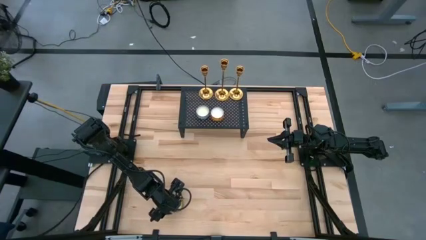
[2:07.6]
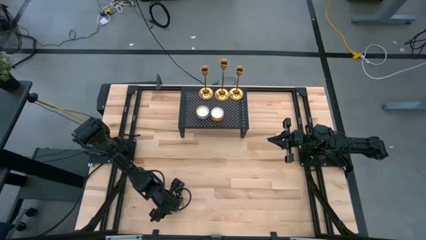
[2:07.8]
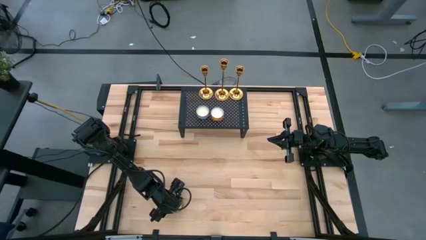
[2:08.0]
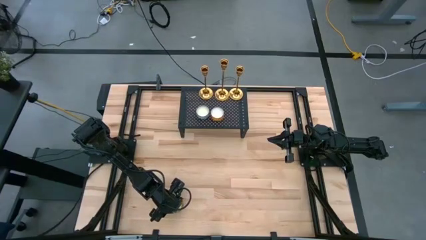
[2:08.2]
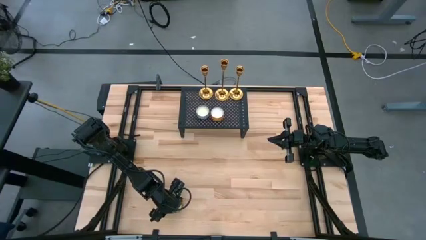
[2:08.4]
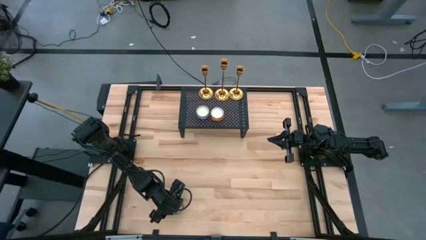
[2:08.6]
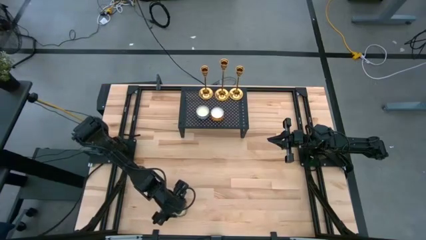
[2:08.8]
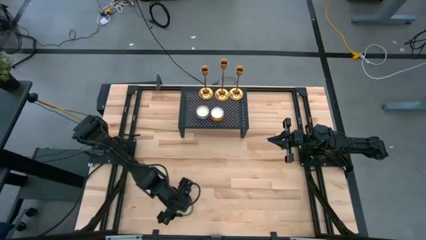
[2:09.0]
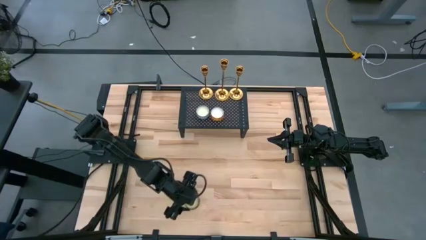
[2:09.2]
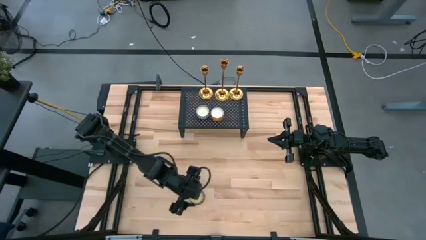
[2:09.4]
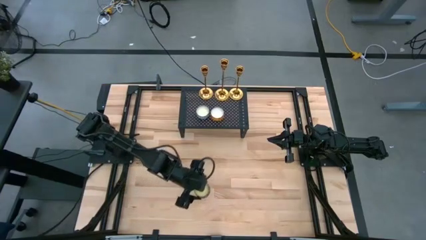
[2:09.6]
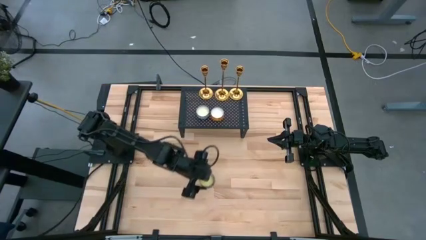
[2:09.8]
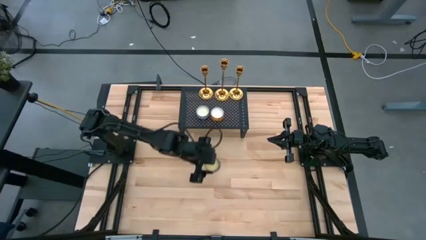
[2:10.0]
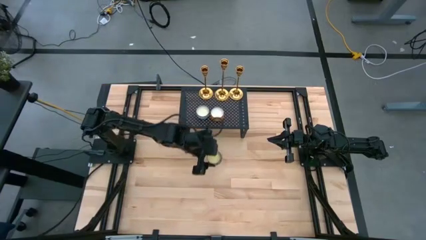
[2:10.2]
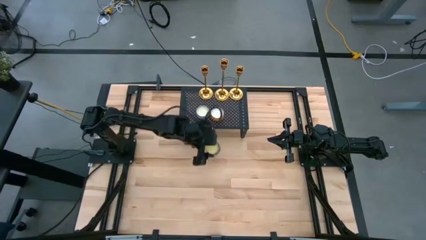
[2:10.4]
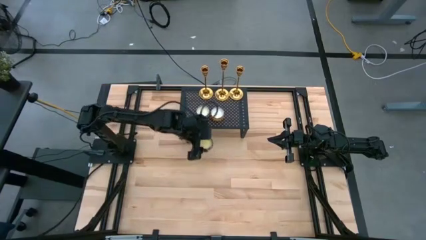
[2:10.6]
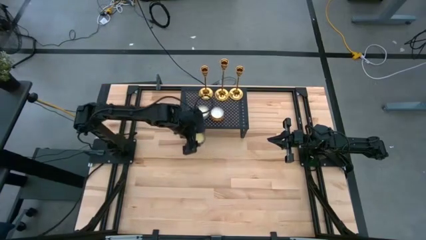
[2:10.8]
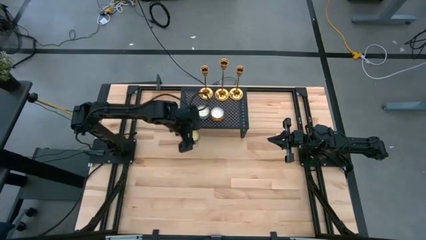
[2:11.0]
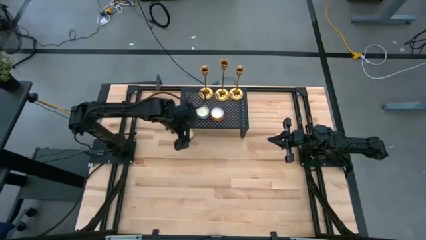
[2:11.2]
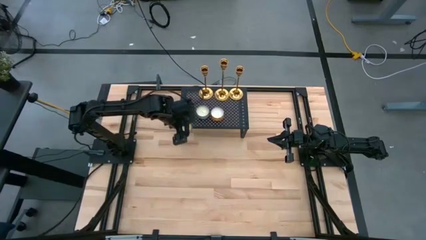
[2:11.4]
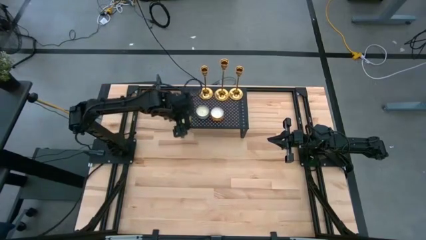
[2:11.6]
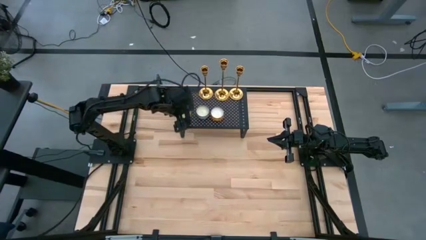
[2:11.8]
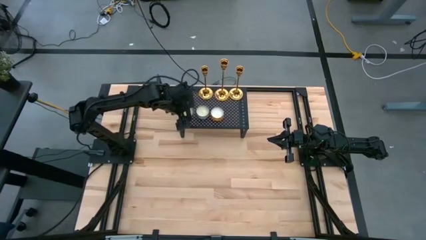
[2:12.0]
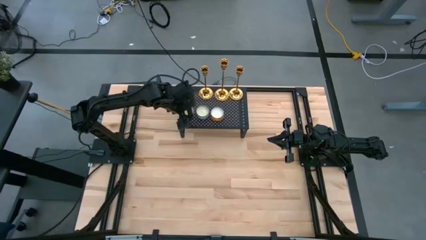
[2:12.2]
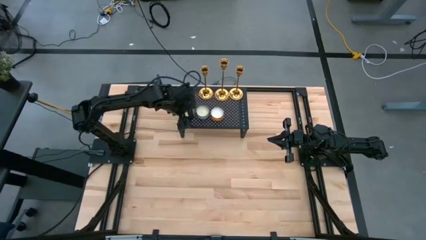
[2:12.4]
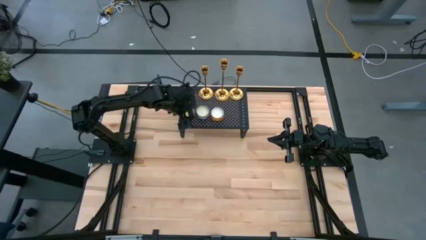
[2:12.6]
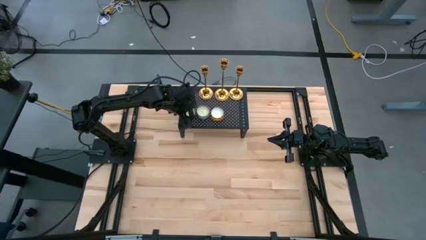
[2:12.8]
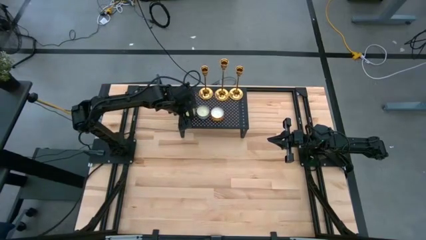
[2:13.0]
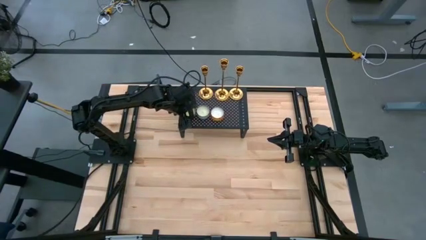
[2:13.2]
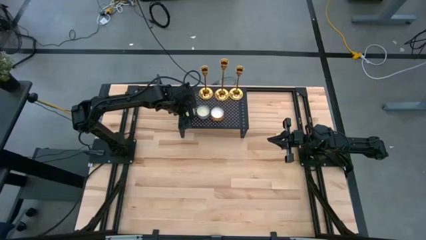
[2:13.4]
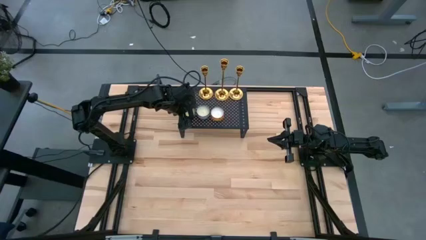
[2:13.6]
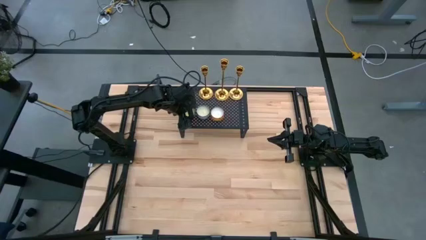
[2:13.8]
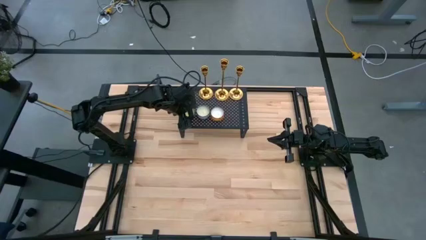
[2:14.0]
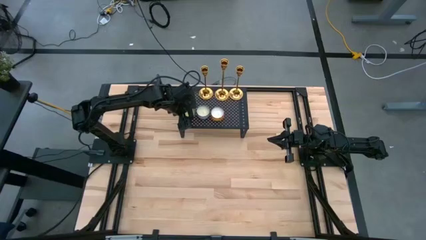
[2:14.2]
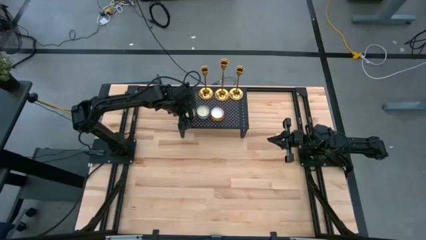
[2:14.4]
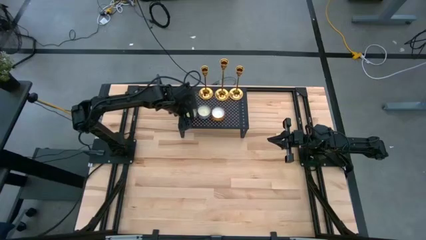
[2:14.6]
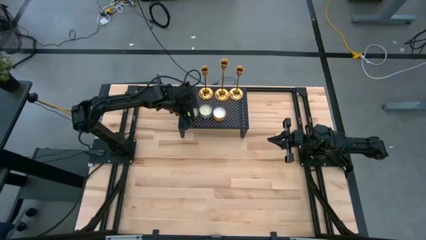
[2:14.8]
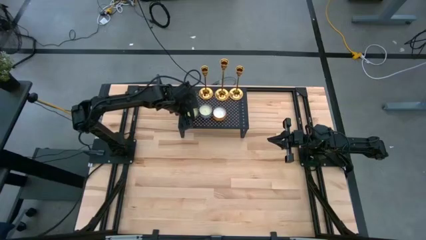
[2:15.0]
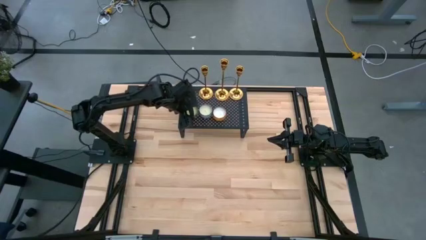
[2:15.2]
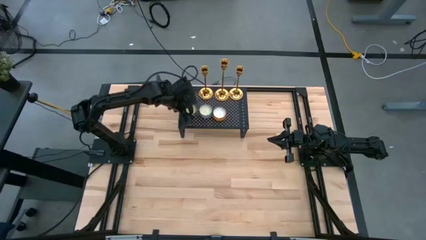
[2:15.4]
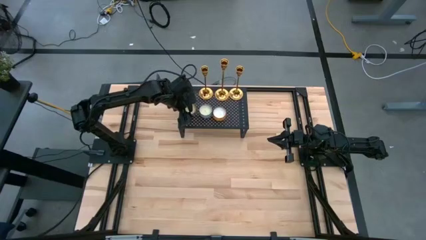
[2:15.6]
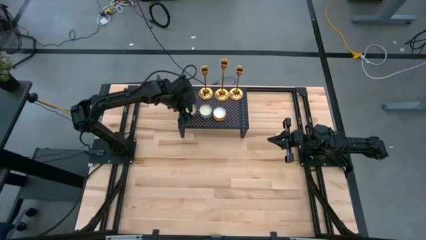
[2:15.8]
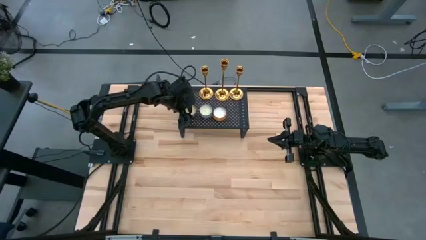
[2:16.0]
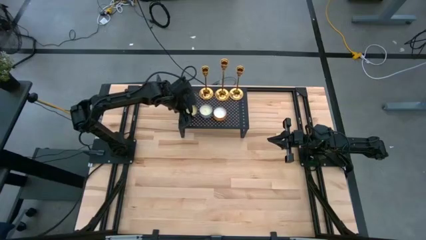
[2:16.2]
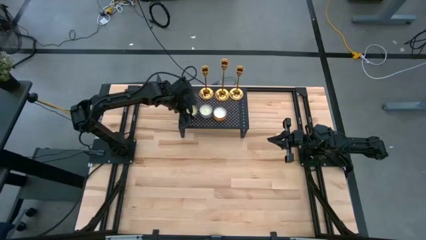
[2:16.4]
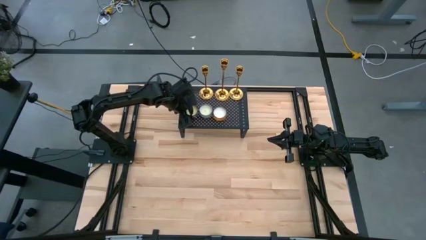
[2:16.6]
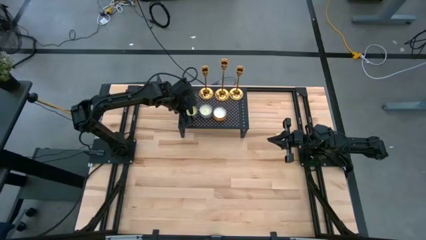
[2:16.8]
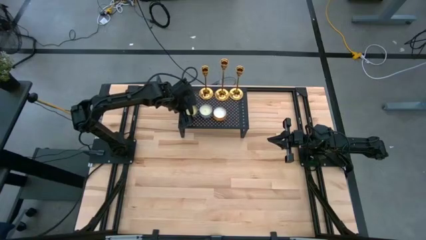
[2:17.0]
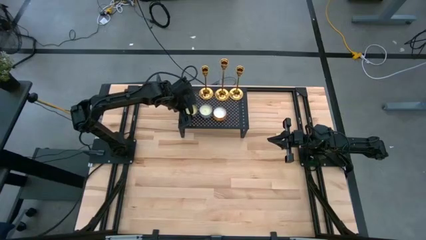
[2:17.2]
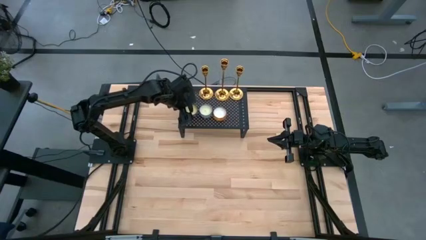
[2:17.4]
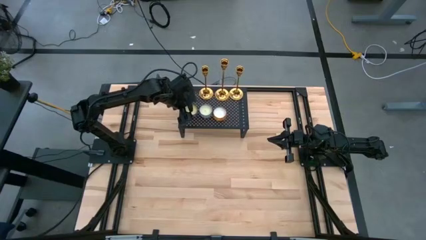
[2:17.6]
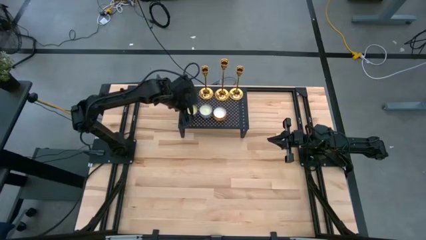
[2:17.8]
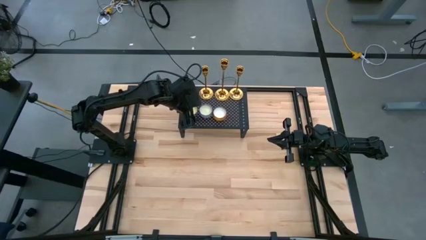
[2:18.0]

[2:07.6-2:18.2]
Task: Pick & Place candle stick holders
Put the red scented candle on the shelf
